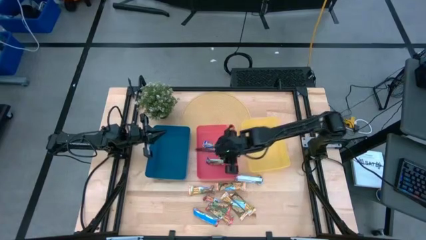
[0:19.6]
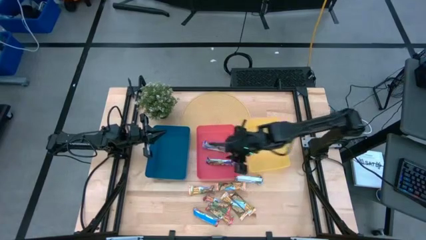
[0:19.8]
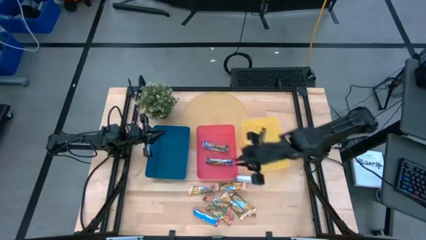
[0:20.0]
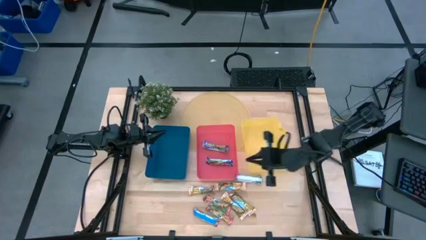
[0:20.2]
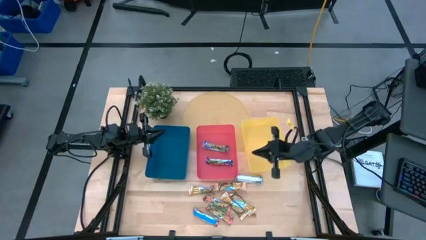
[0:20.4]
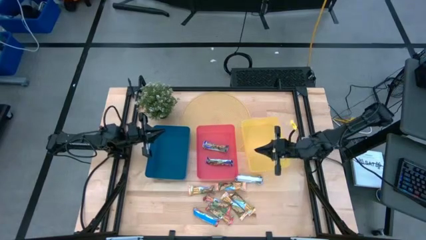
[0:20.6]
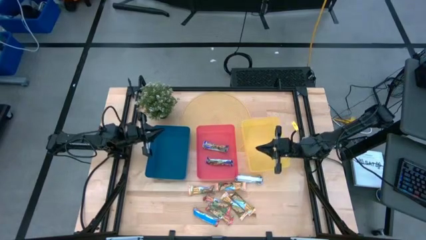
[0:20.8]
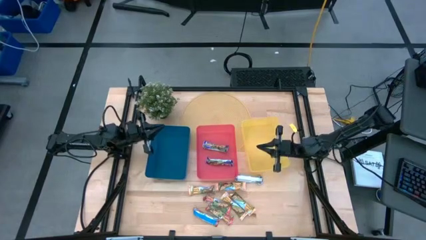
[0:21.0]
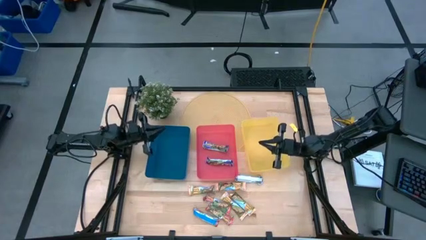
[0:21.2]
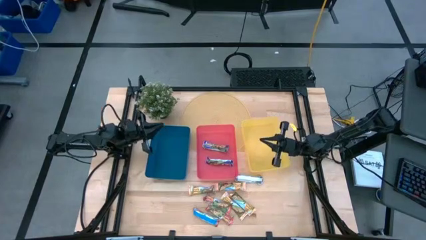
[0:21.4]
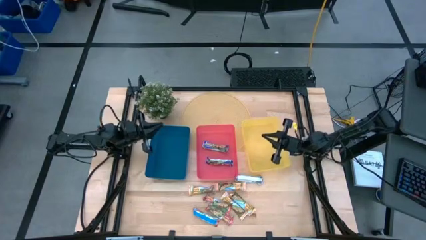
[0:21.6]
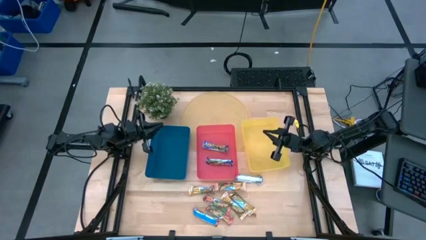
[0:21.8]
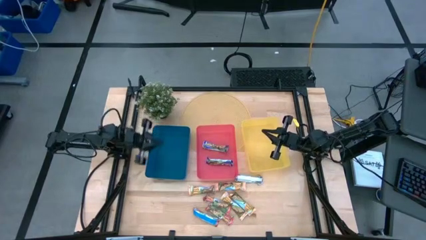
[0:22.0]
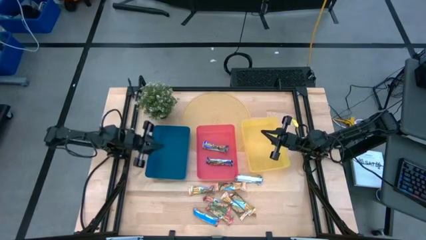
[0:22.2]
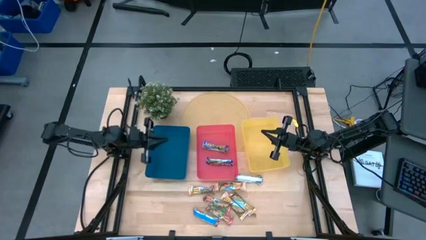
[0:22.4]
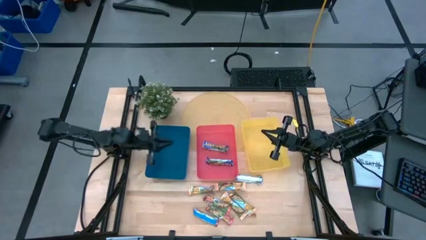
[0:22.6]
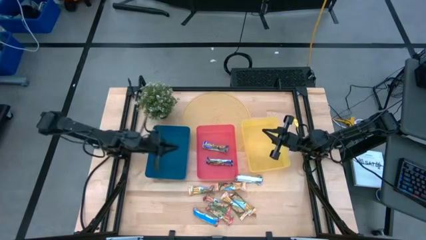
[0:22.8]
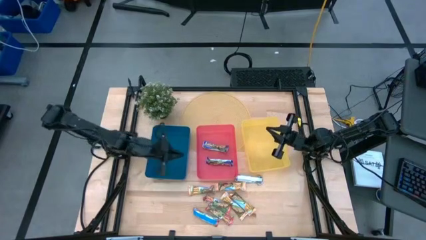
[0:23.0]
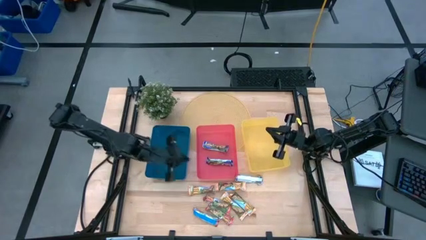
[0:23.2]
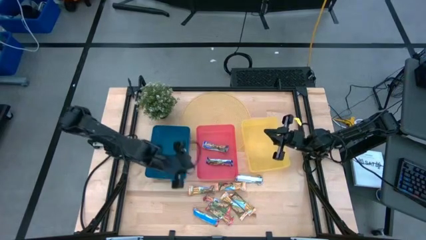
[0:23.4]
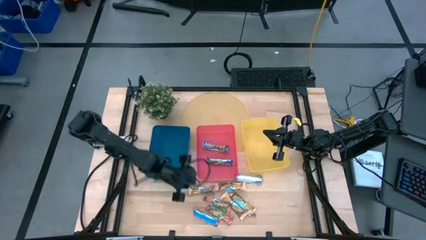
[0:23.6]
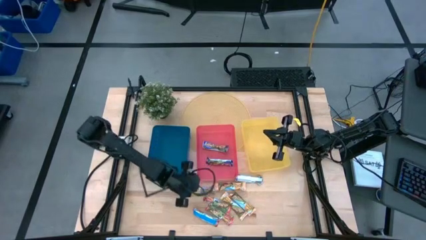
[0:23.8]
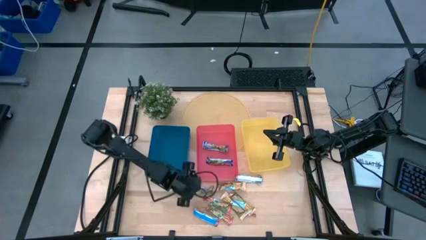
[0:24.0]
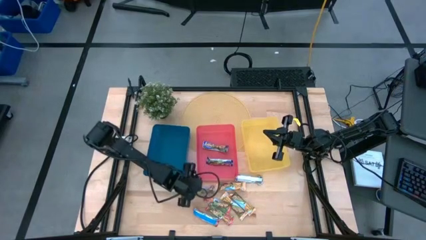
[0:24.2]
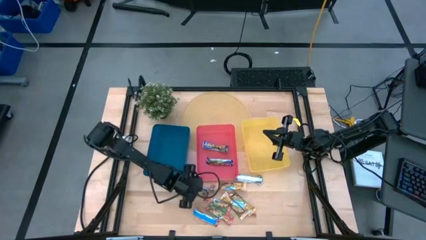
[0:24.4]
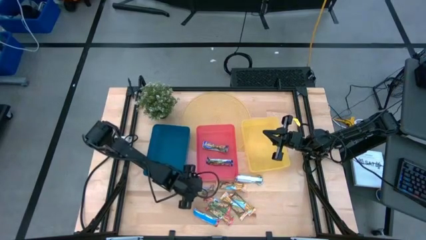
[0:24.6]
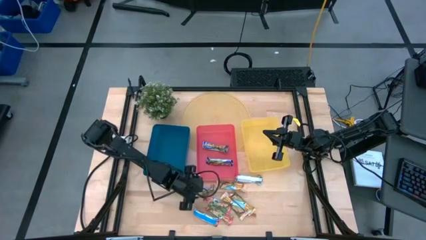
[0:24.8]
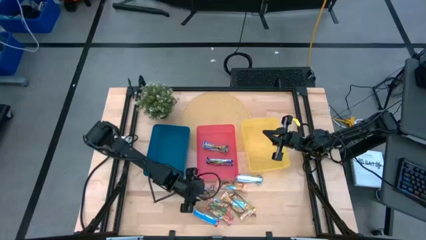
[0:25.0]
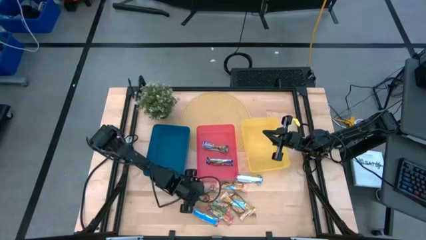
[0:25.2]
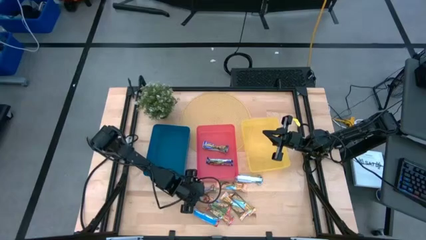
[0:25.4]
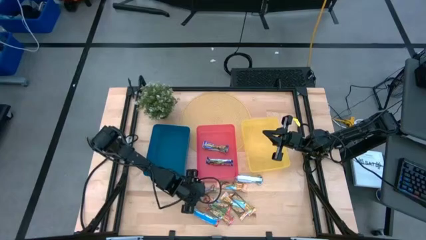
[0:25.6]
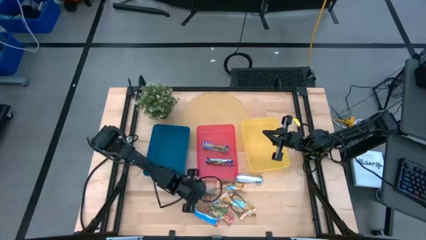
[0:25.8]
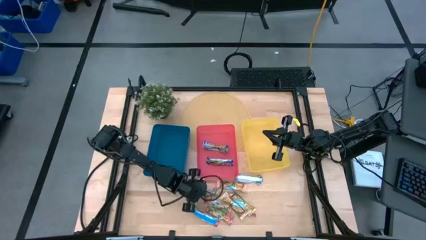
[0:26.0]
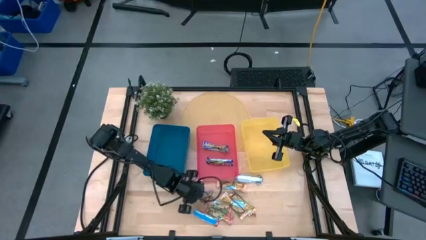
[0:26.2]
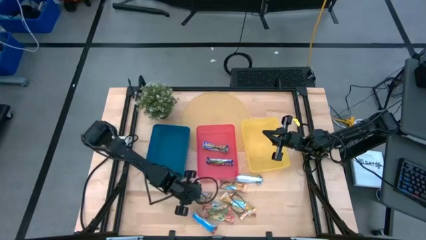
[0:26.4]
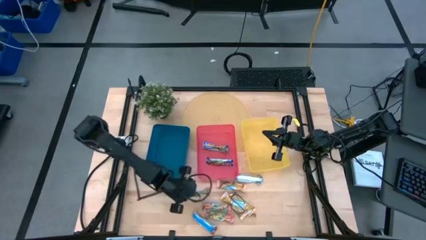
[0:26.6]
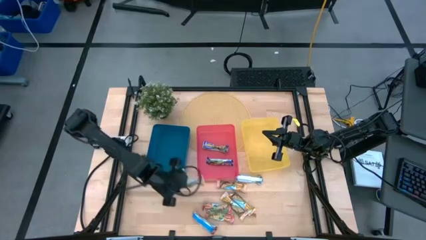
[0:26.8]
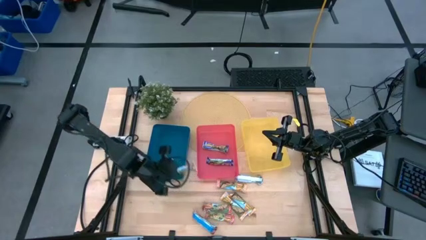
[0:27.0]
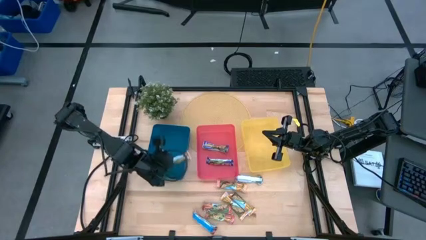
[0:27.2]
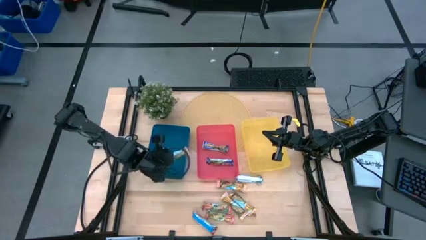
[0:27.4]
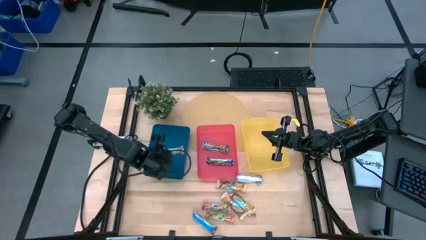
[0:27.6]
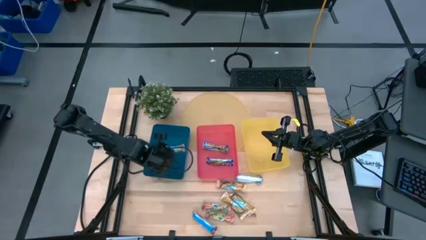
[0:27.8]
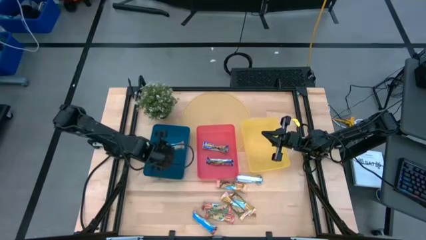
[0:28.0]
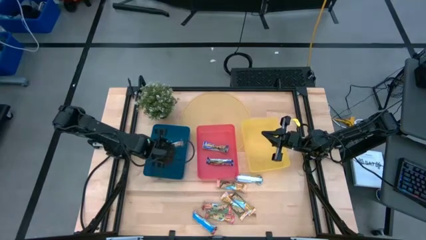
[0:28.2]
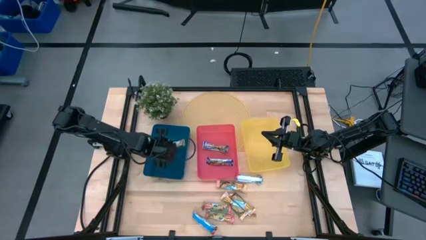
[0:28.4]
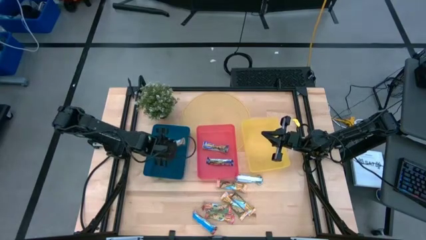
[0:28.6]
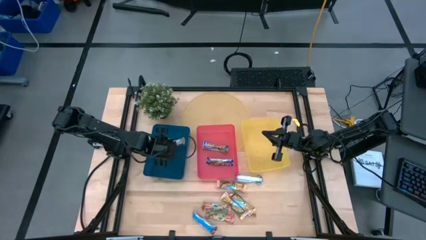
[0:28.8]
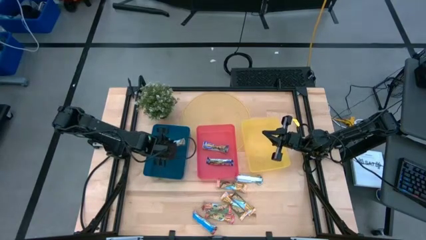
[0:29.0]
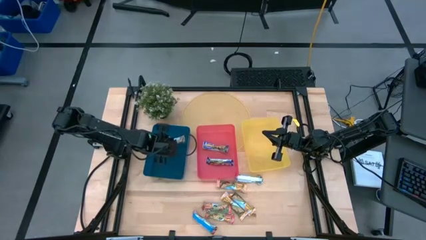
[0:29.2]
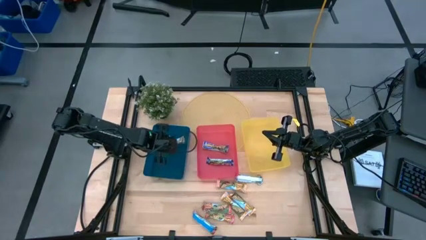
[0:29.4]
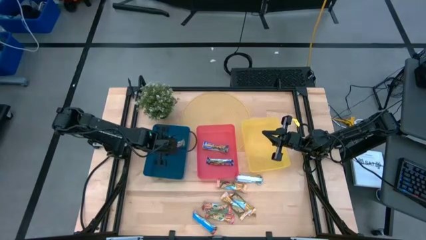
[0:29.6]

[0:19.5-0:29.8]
Task: Pick and place Granola Bars by type
Put the yellow granola bar into the blue bin

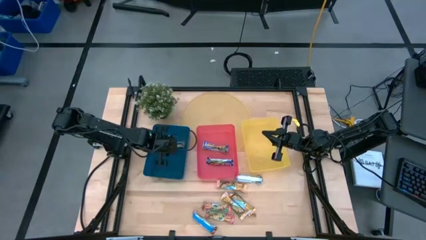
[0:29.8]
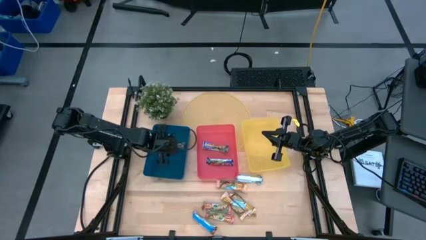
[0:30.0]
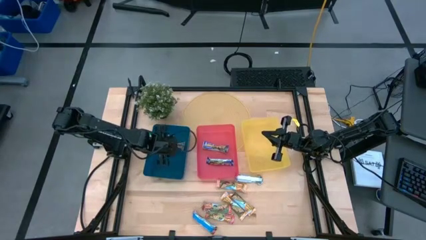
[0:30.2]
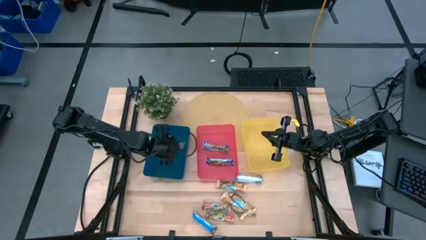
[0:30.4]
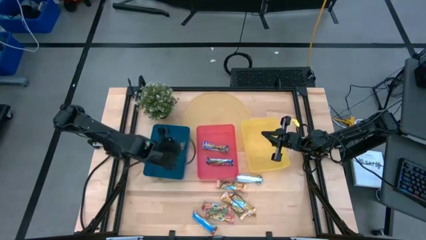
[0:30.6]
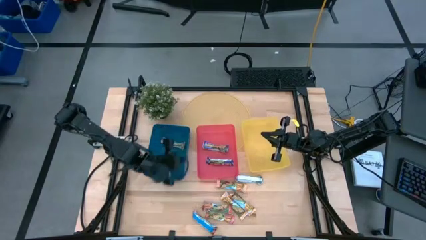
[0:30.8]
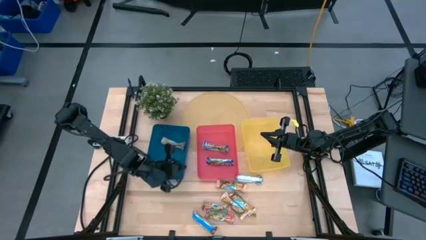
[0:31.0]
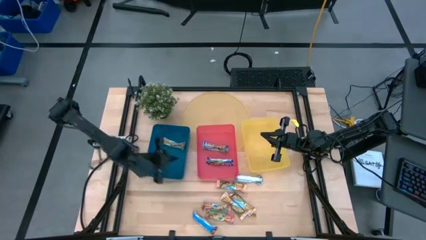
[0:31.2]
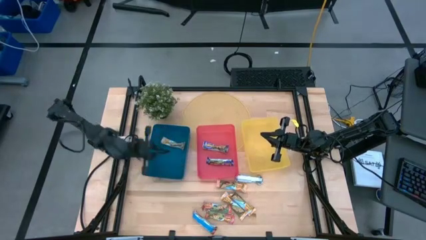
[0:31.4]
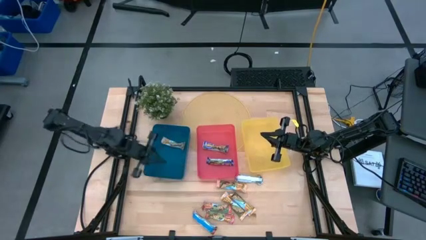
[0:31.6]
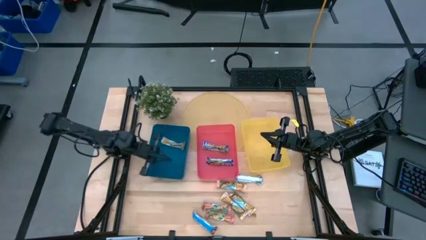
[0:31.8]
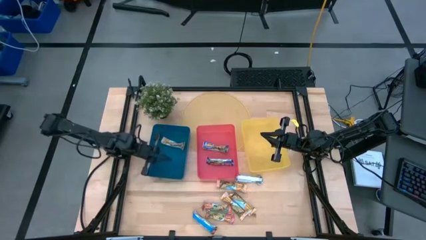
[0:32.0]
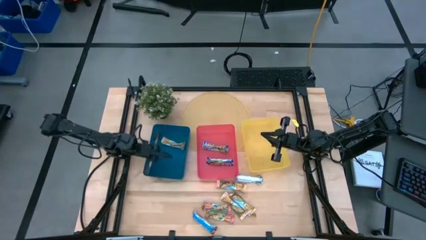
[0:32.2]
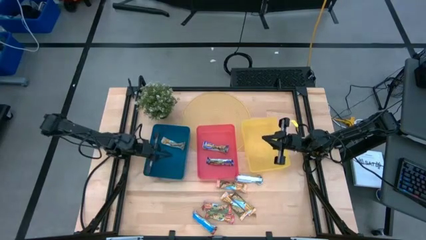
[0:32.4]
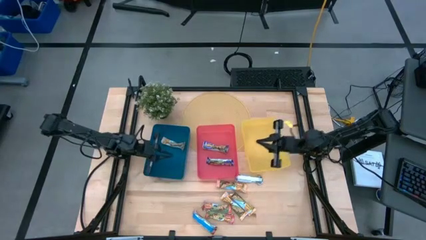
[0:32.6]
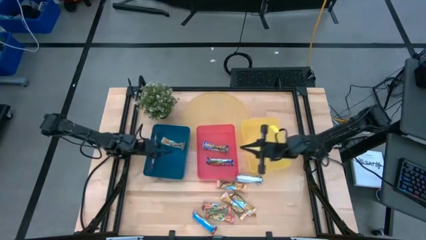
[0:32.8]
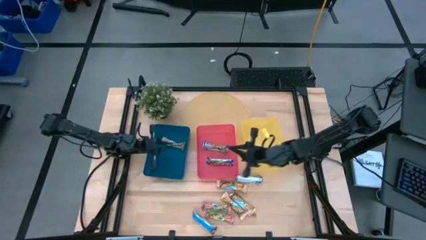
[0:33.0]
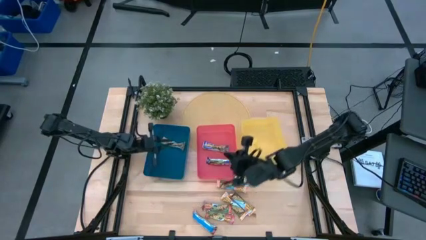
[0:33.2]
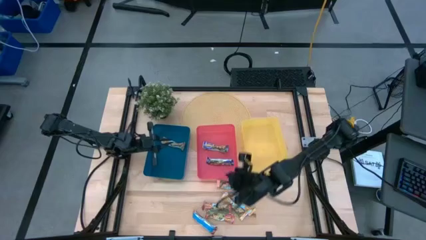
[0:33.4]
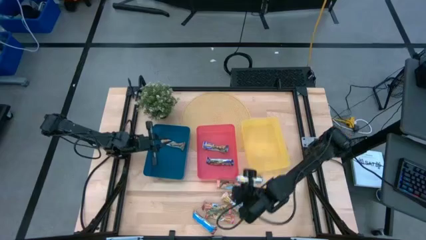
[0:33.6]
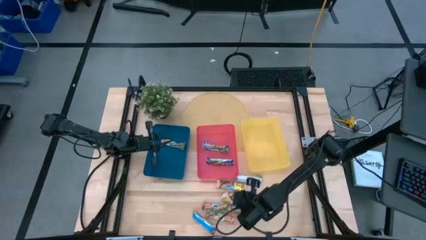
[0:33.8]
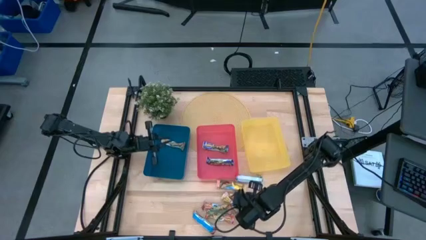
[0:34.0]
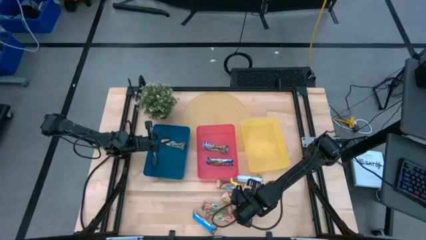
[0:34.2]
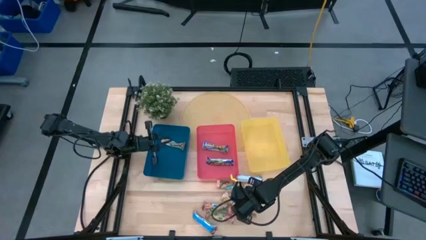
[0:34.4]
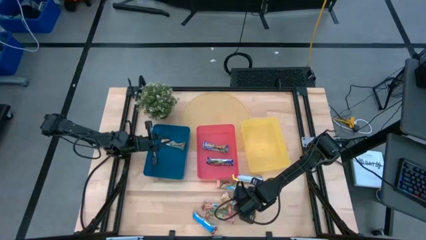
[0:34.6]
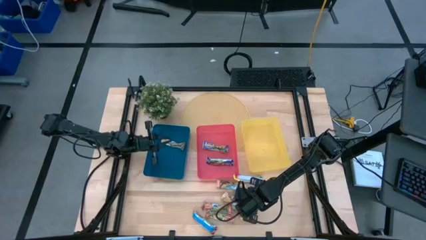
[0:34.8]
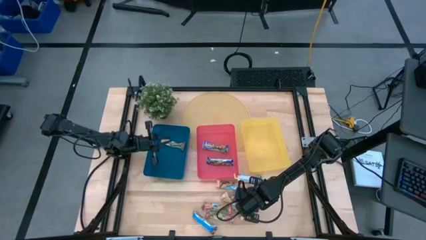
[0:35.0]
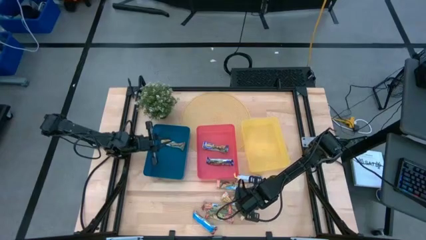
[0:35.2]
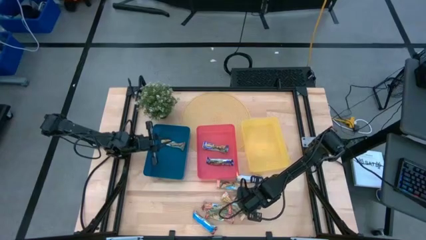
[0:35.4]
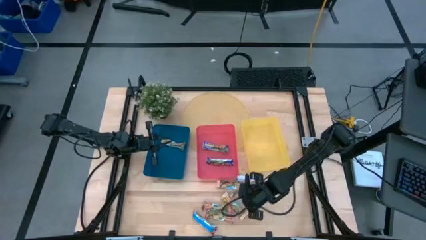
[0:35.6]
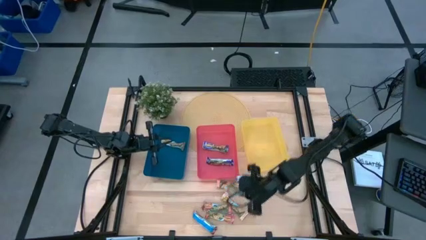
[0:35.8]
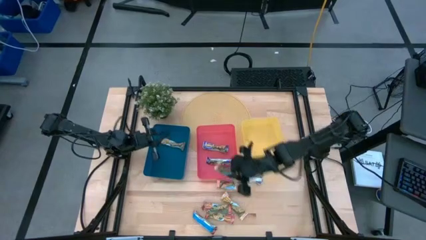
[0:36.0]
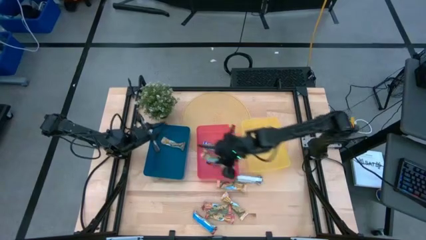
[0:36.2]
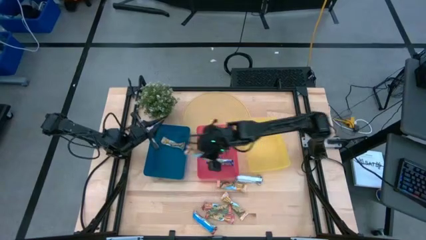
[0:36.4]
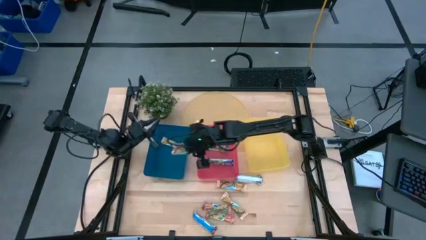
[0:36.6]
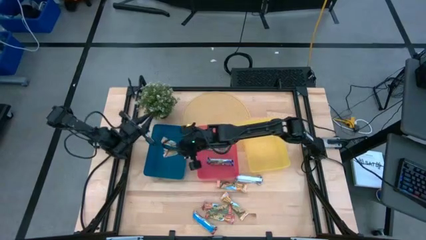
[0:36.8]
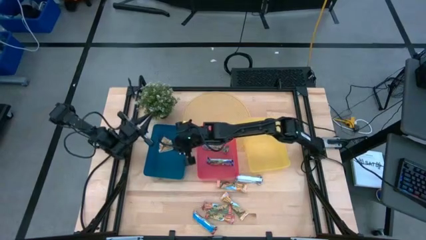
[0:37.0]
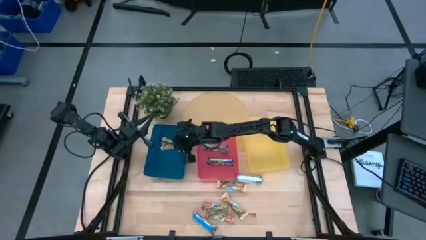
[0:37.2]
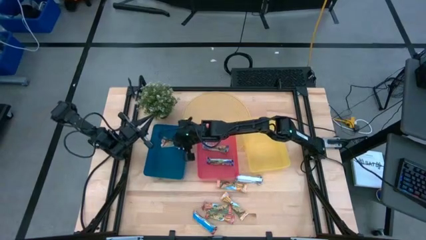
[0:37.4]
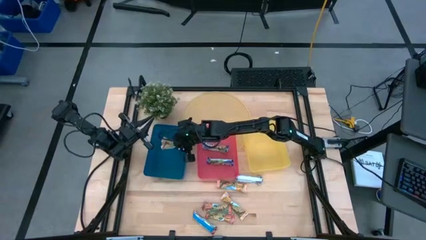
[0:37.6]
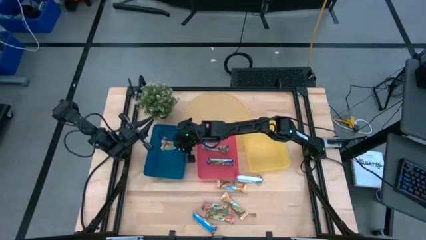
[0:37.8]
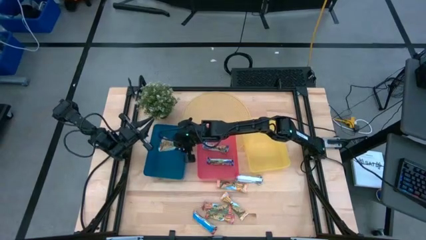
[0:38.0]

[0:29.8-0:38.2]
Put the yellow granola bar into the blue bin
